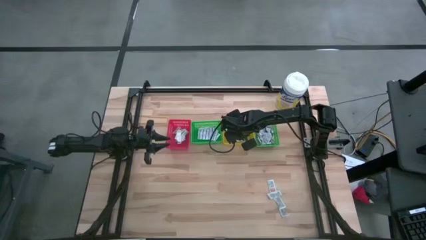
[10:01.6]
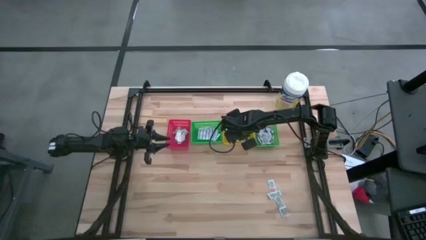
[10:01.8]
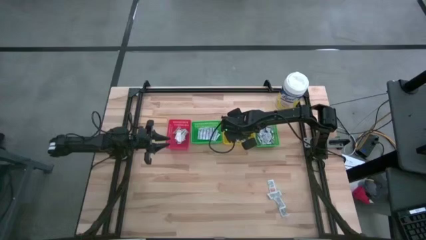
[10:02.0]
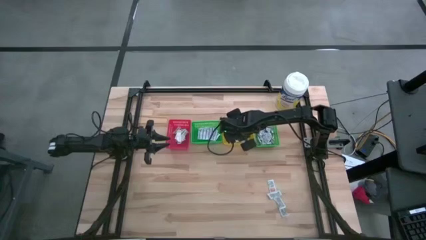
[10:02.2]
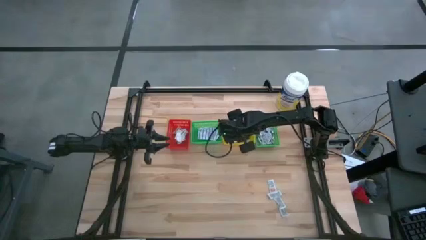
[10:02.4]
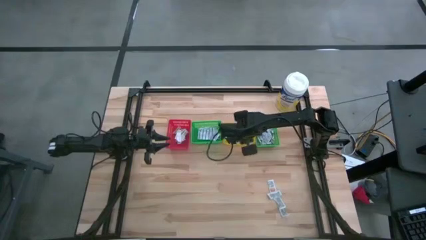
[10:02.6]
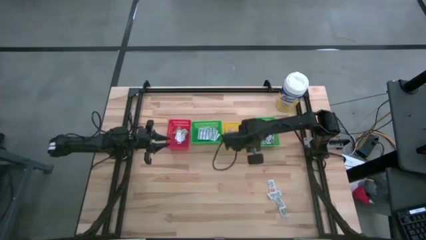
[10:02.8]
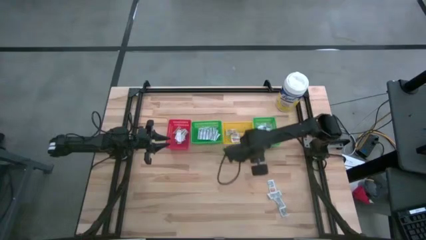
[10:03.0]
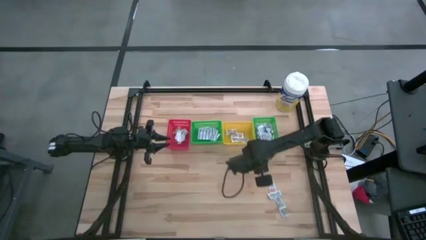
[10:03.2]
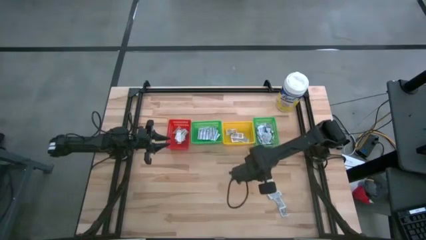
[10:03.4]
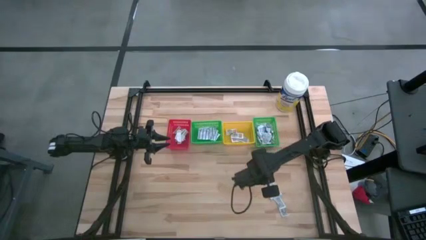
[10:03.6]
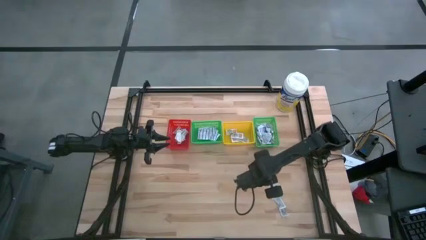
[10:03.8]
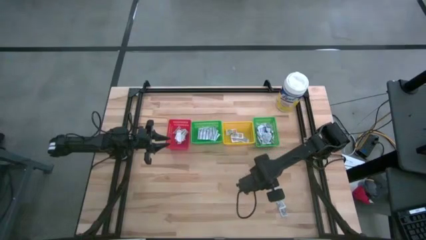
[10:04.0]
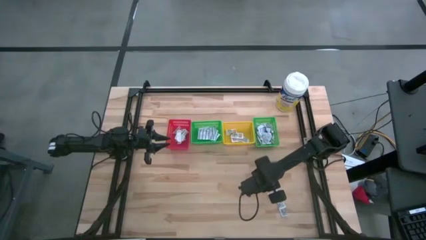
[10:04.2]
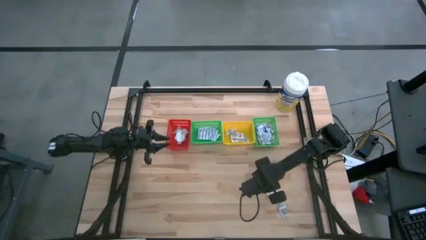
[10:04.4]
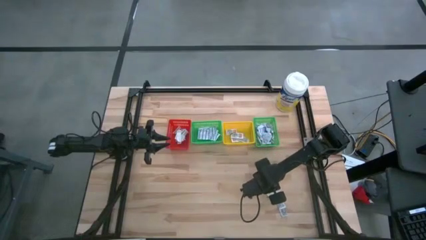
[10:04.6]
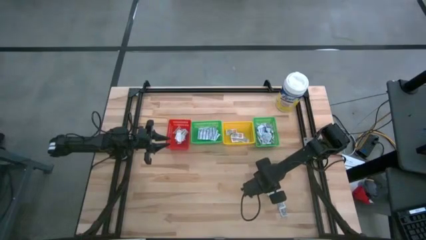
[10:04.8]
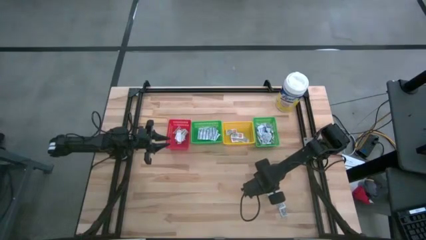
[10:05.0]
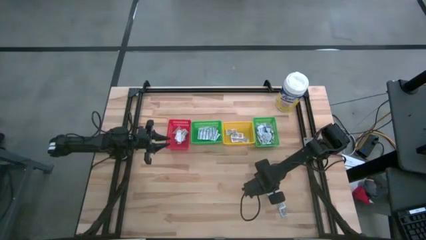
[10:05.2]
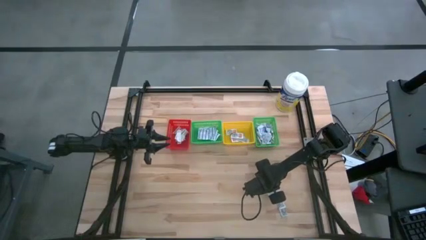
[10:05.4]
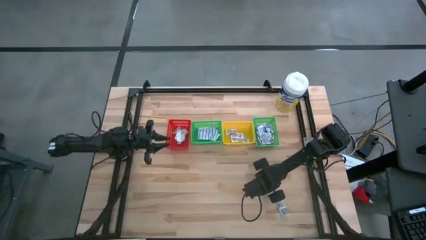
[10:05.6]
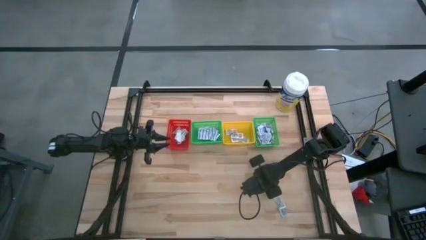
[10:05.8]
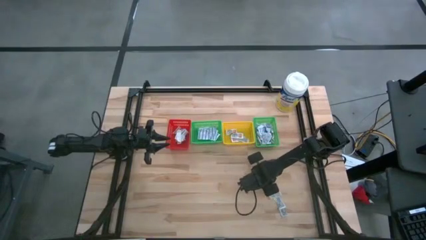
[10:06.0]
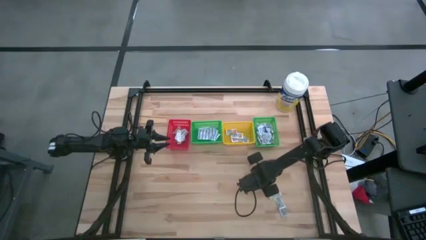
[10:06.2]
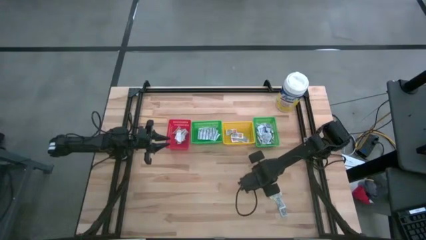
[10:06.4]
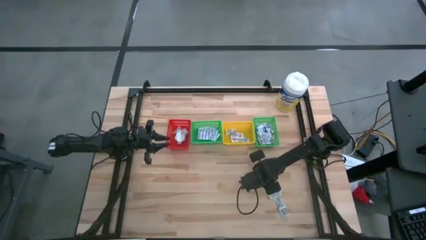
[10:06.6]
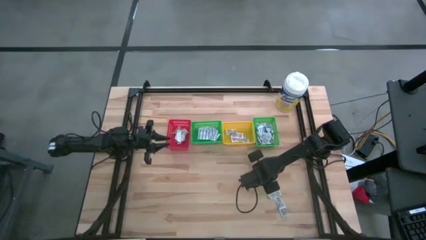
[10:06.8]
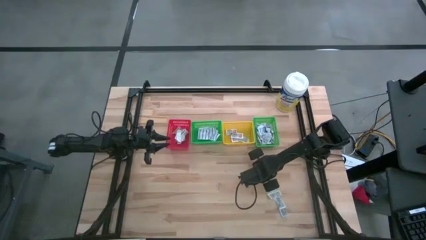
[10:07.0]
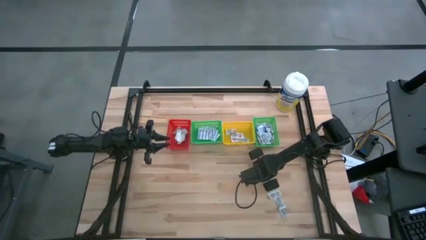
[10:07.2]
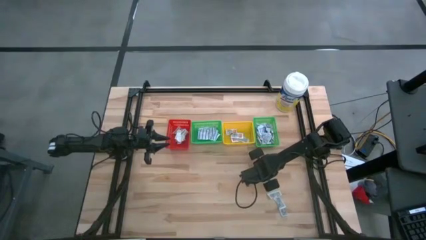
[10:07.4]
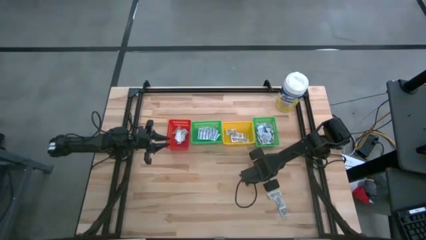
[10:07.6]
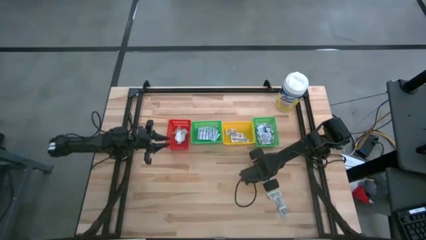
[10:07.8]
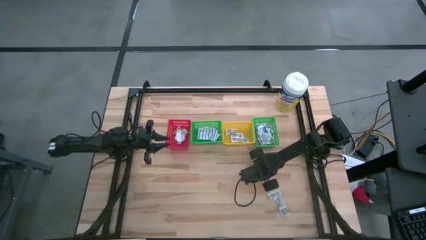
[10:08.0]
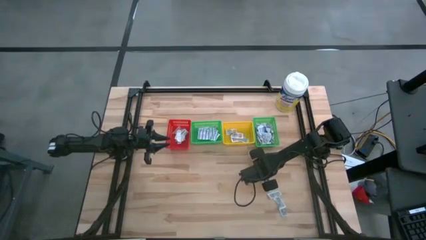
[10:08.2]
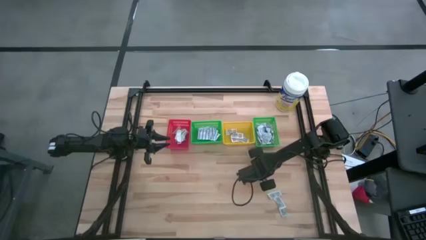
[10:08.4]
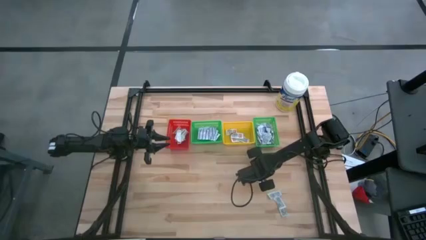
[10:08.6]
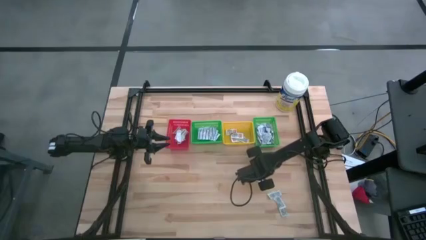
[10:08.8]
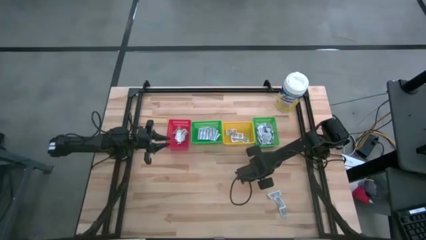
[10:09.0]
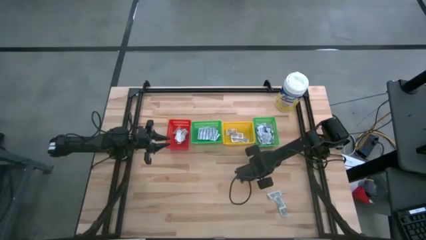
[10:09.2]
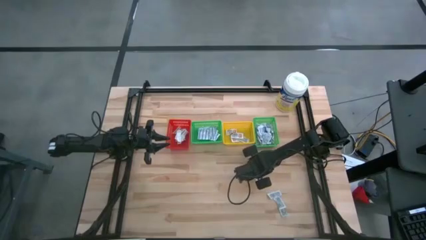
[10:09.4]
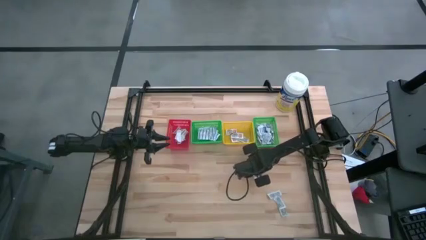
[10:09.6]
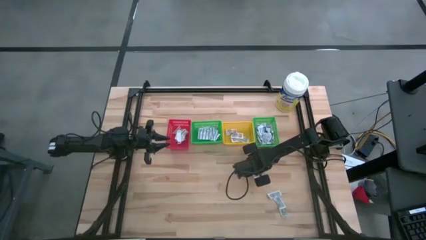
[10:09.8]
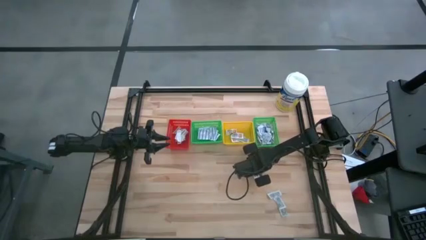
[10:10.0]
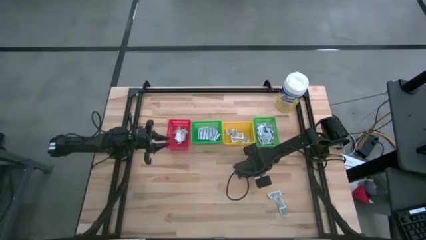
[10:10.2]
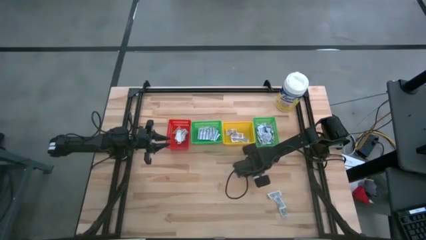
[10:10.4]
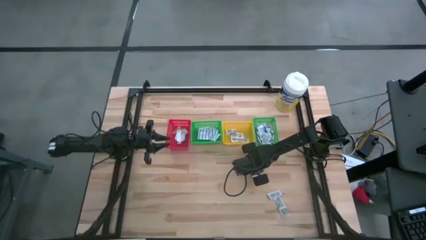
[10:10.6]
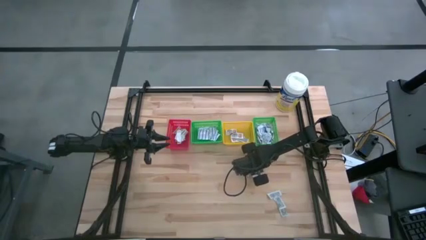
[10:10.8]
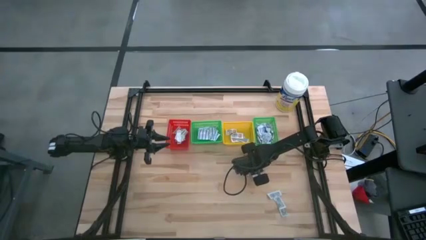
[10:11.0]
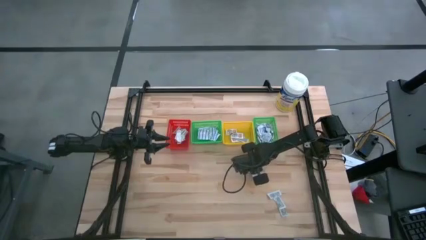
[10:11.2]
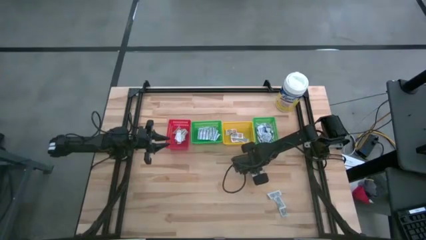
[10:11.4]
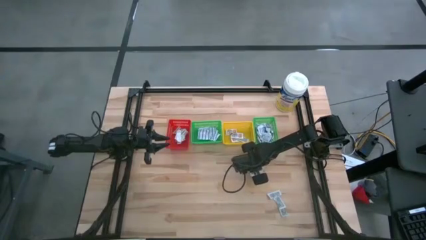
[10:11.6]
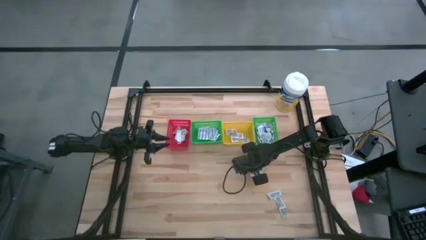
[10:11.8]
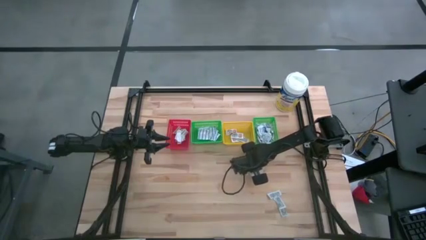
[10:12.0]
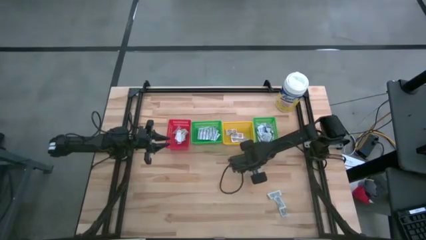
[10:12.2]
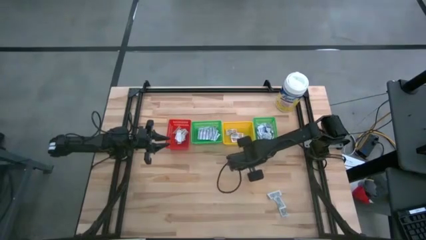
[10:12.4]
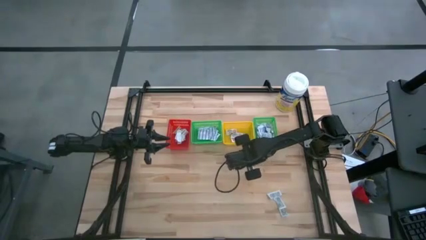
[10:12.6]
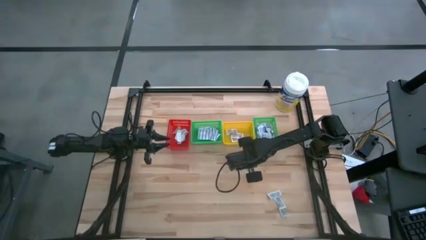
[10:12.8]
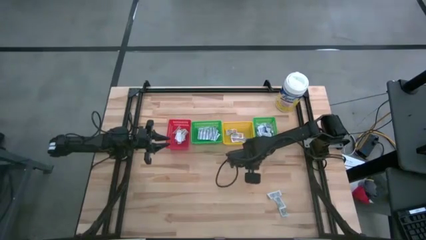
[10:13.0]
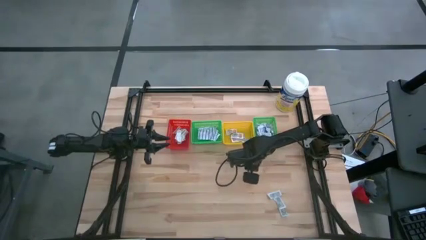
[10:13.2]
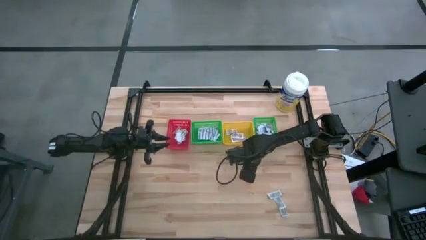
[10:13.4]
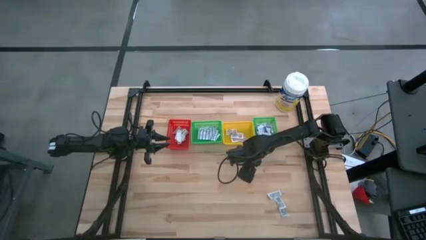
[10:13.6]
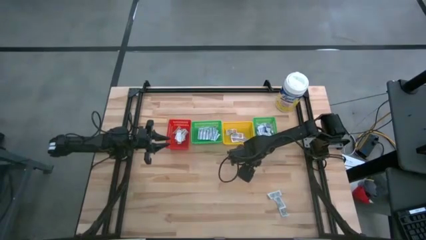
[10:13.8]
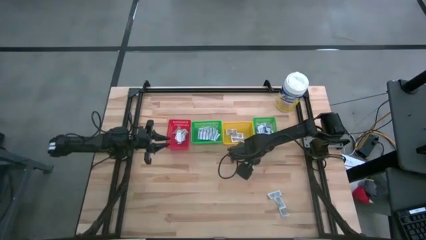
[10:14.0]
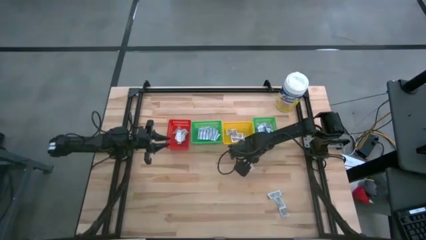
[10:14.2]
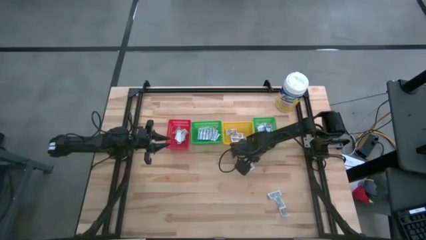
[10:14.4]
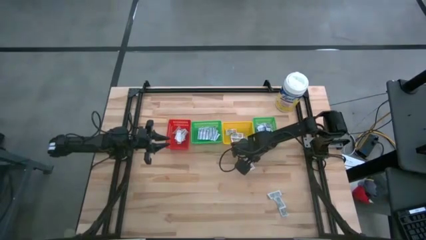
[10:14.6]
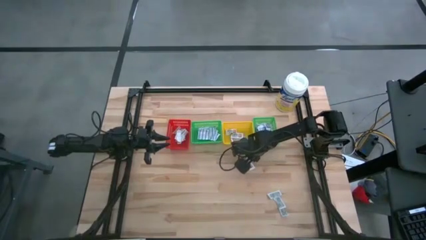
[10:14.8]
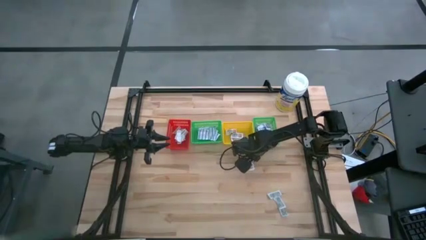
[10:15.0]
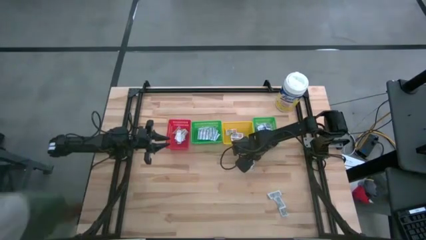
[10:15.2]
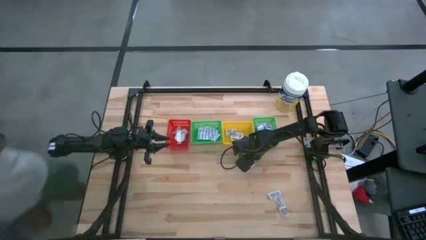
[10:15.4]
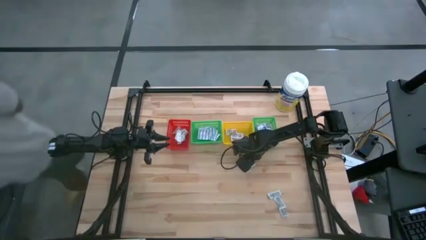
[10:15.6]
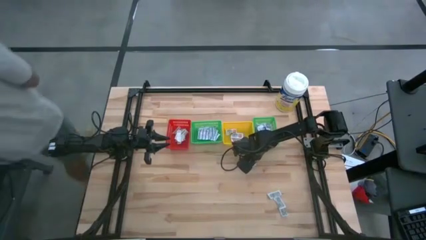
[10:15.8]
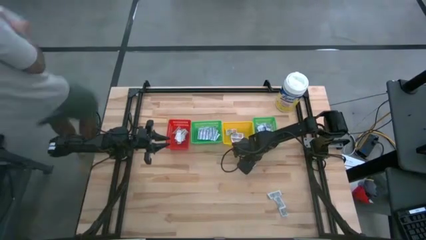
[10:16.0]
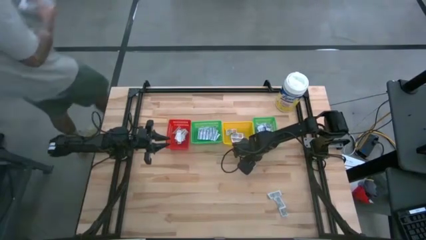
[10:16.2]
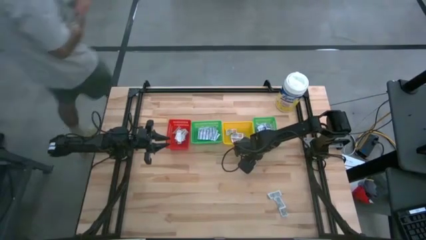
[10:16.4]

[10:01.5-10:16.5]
Task: Pick & Place First Aid Supplies
Put the orange ointment pack into the yellow bin
